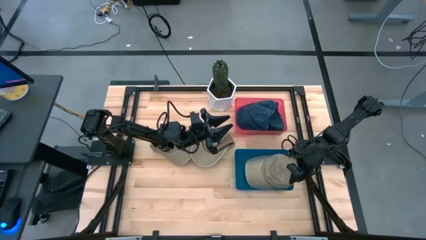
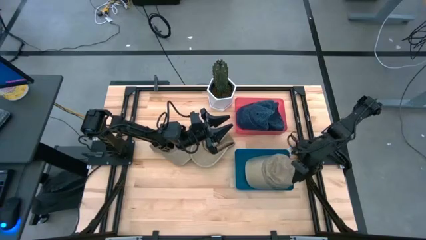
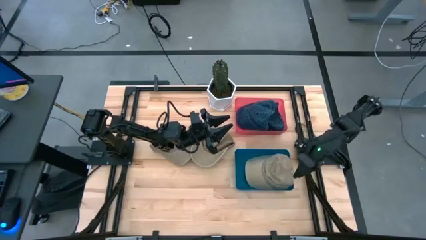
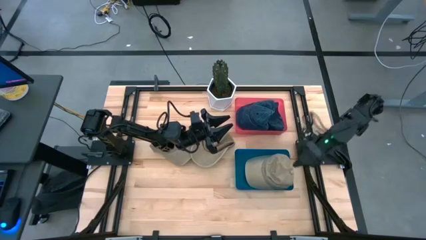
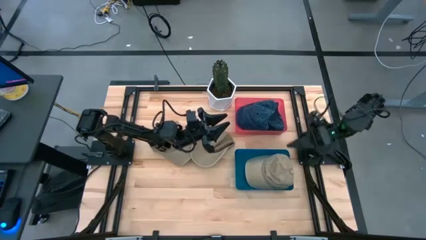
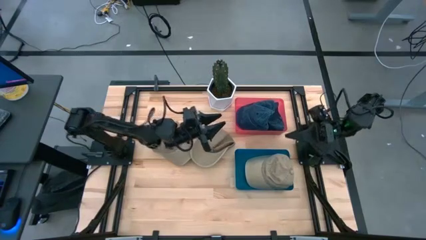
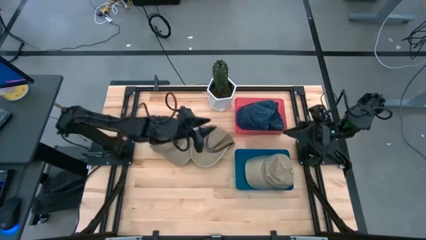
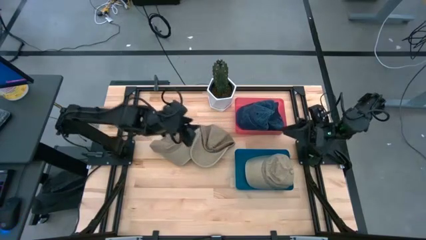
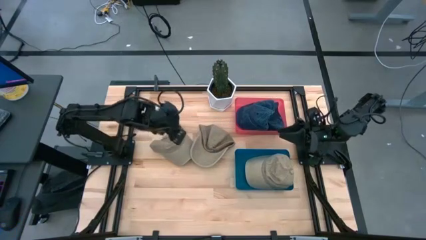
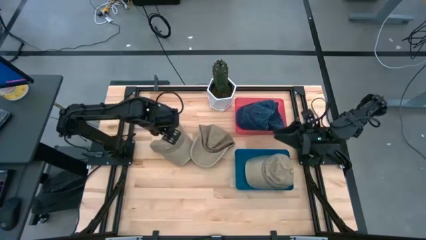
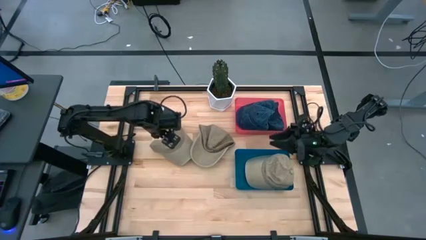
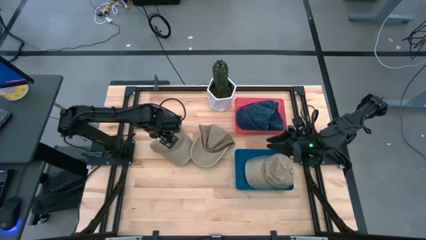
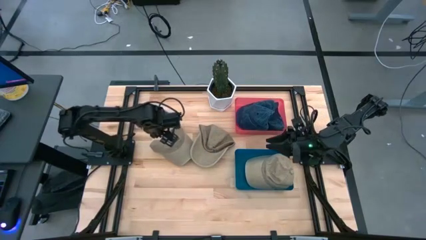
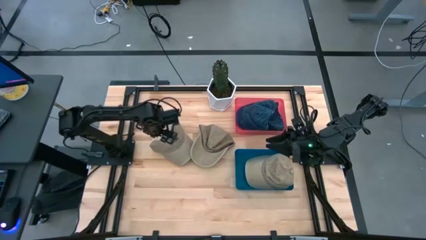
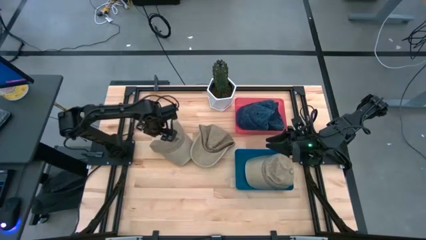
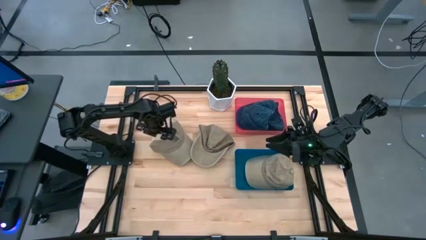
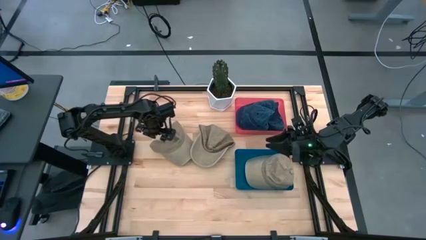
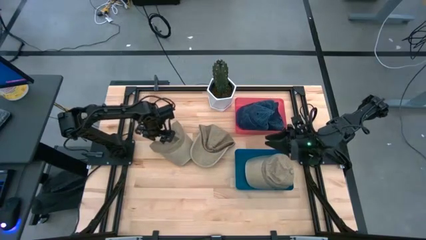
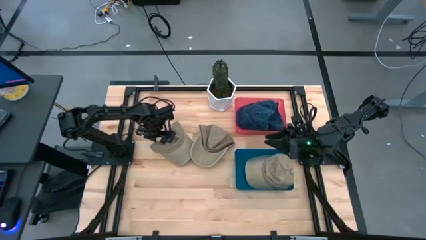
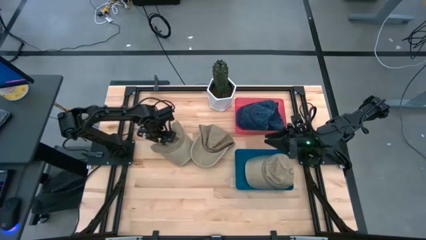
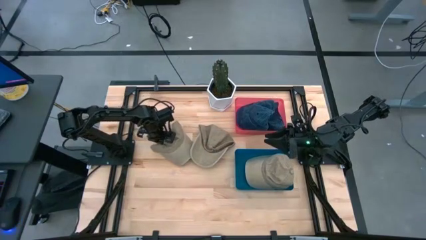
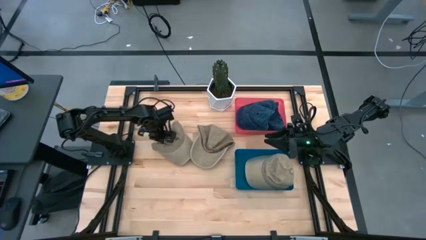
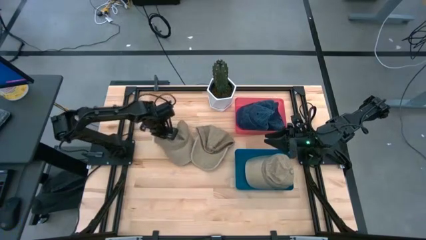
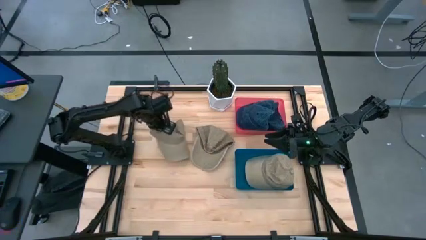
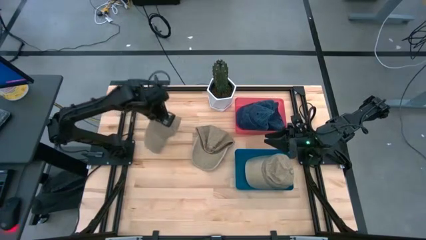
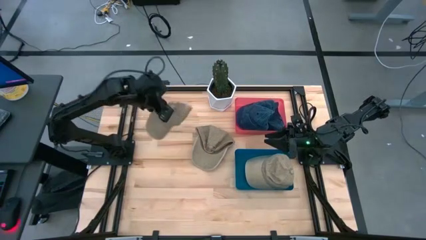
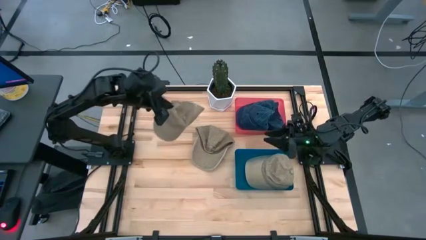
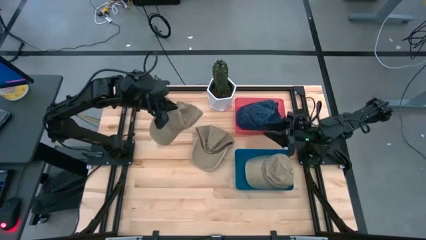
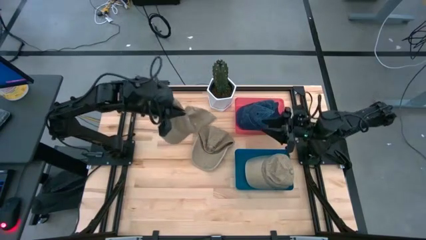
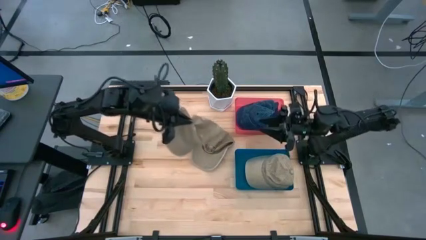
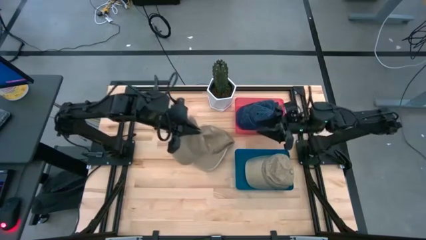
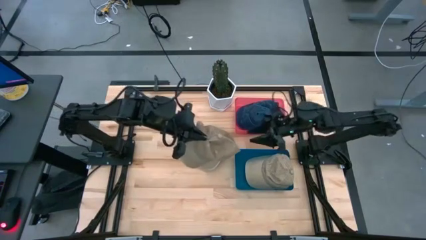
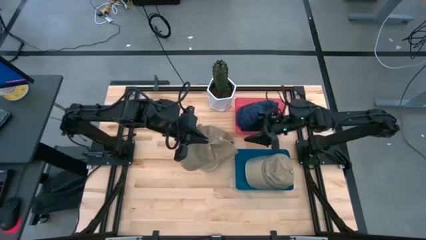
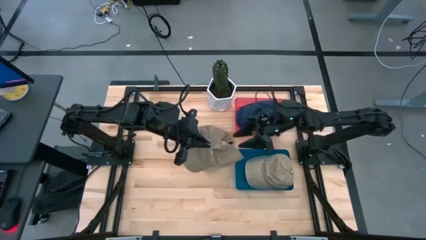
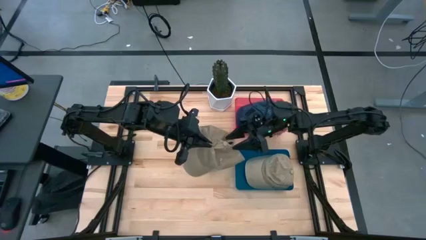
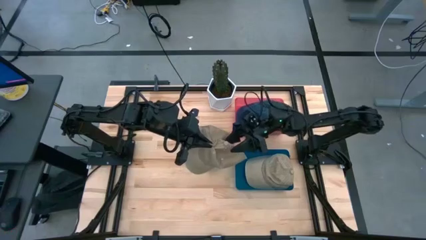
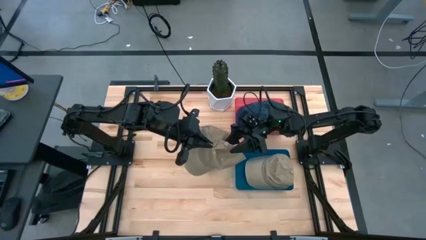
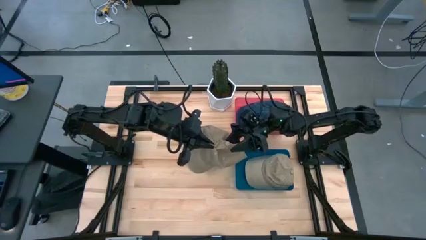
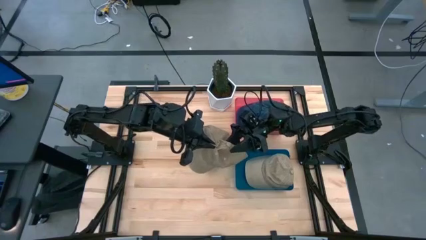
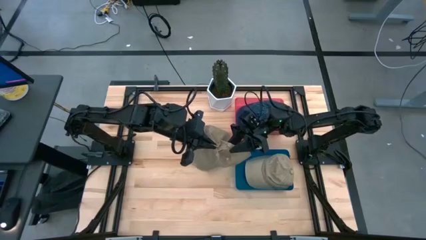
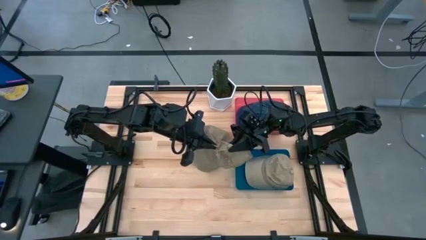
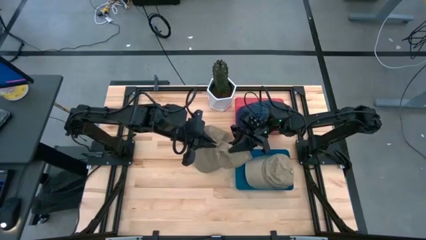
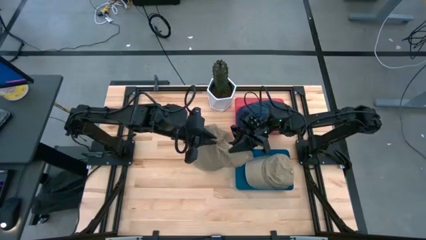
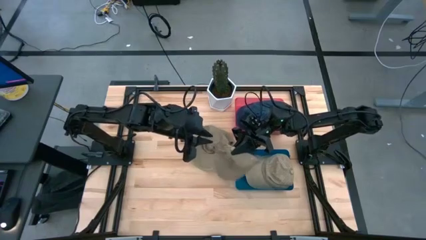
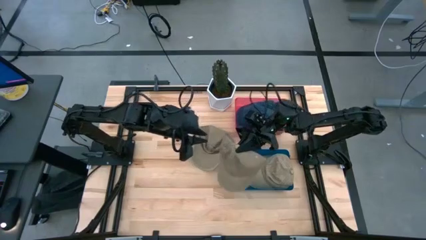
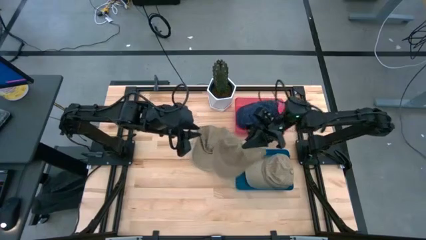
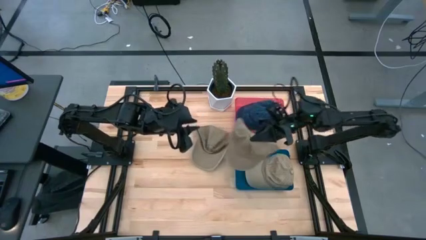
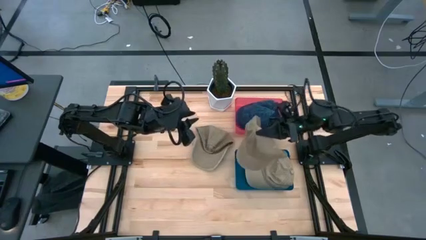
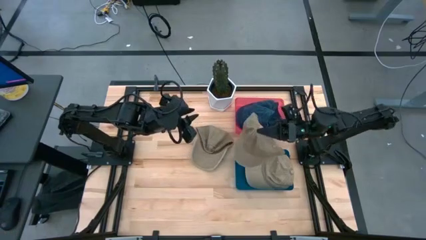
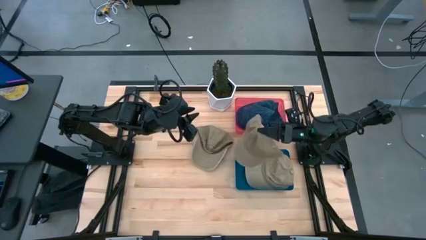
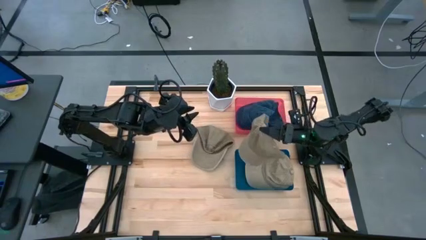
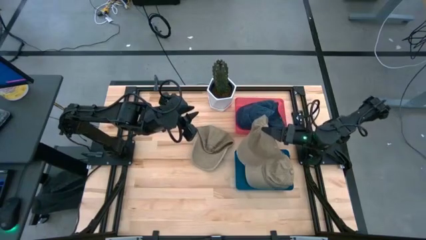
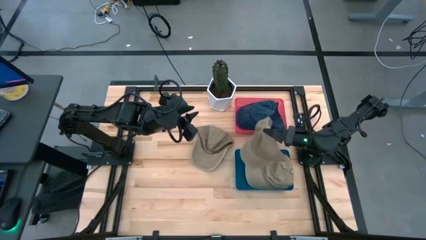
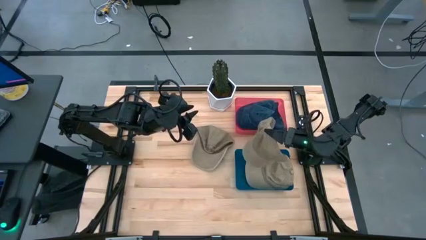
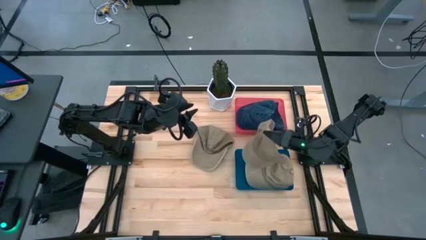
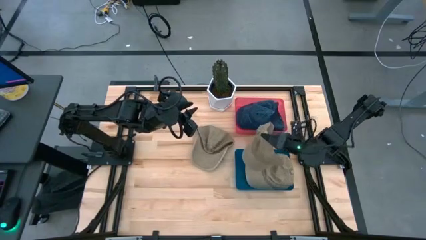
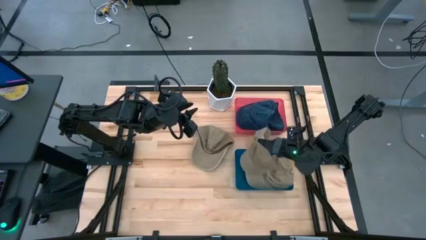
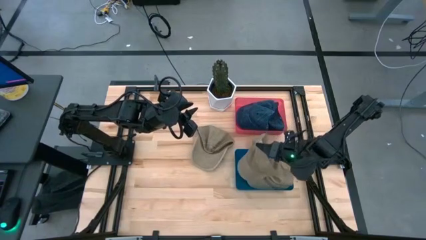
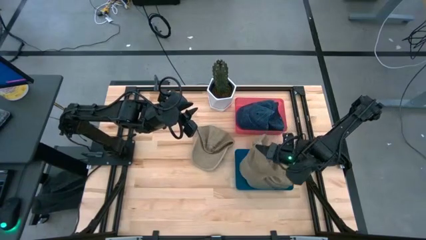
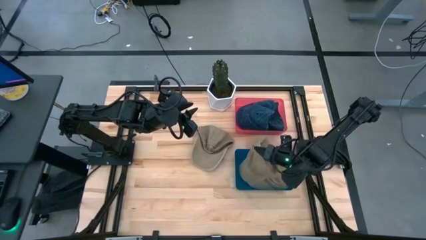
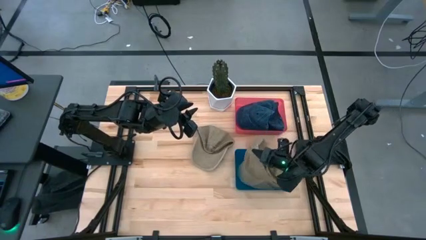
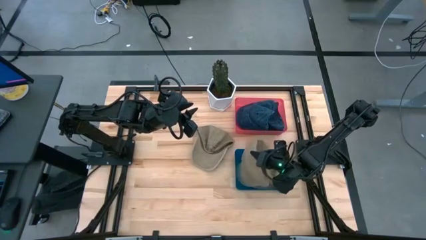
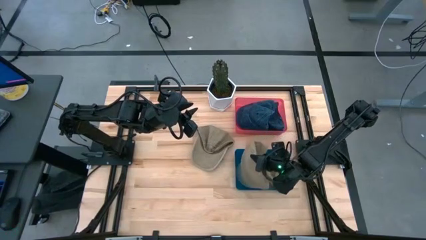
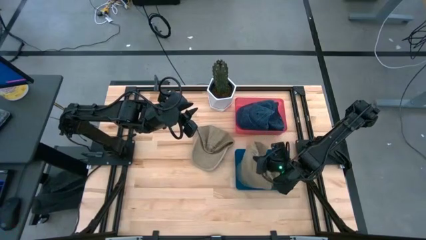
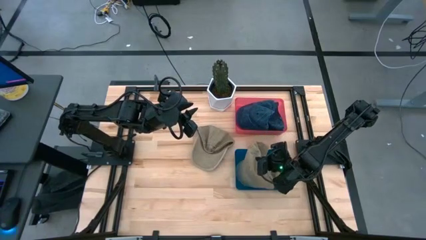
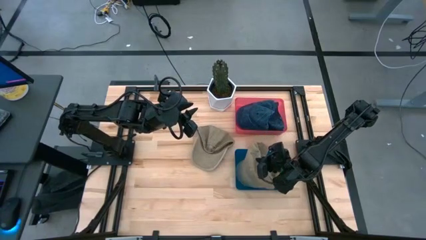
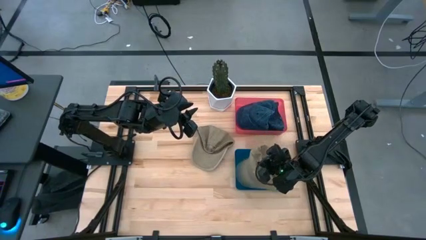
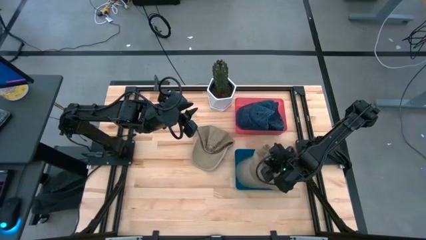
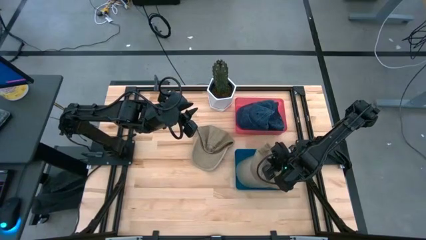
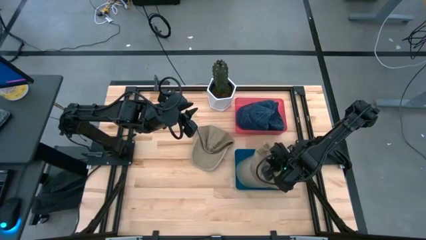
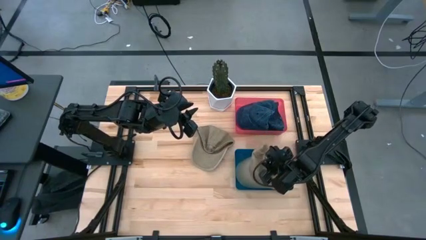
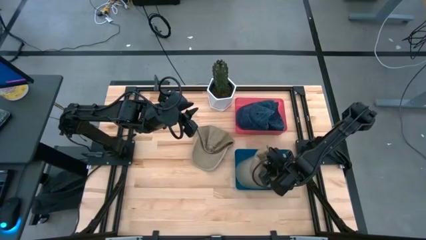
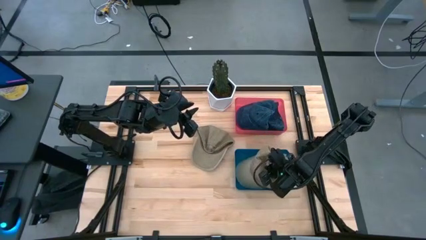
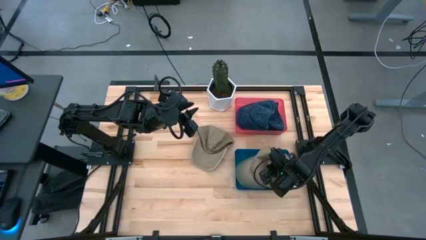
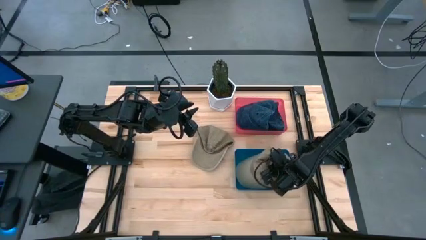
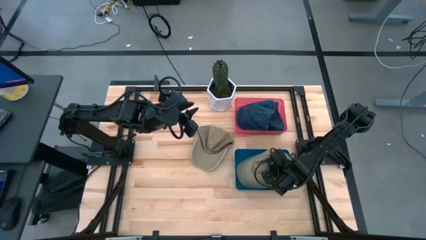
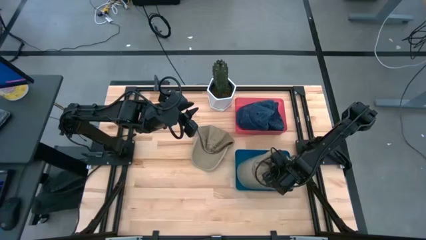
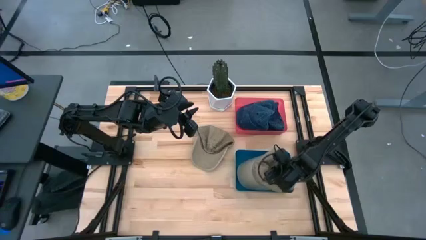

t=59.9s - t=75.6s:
Task: Pick & Place hat
Put the left brown cap into the blue bin

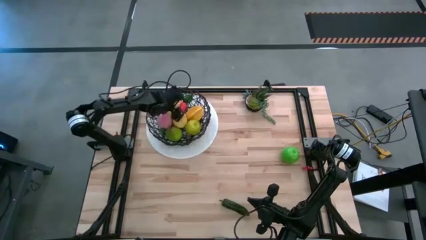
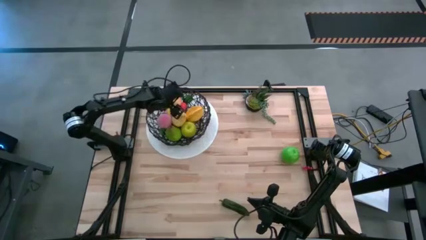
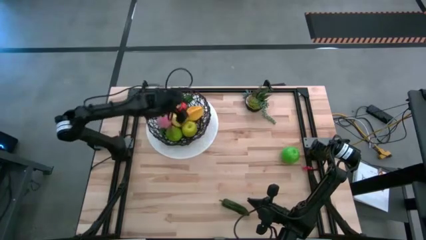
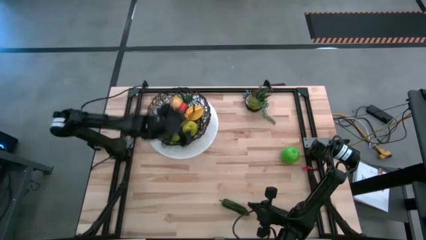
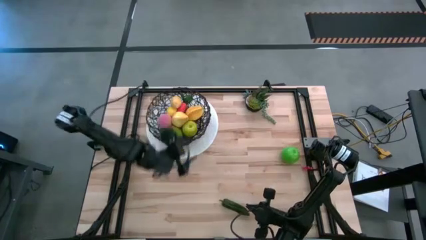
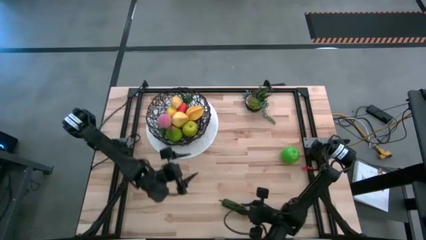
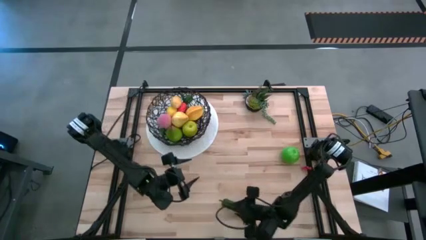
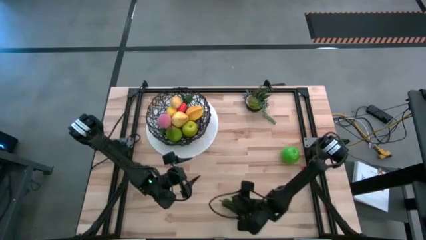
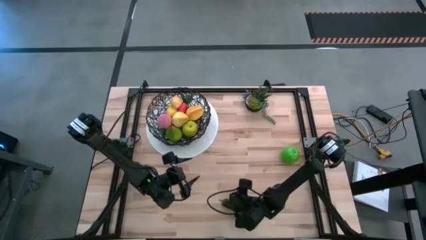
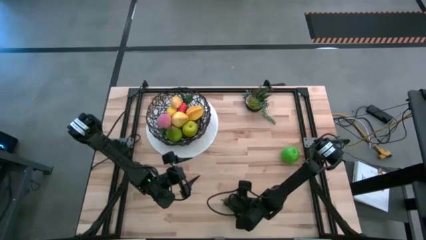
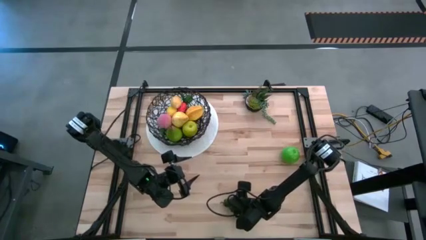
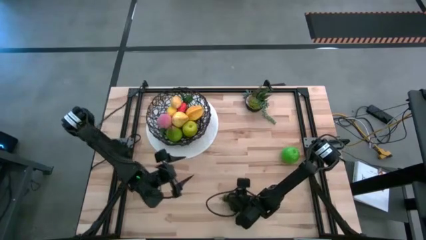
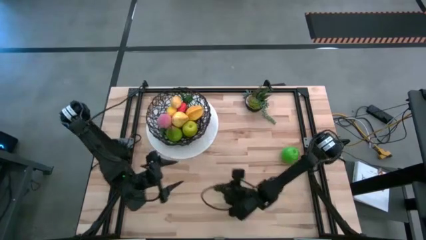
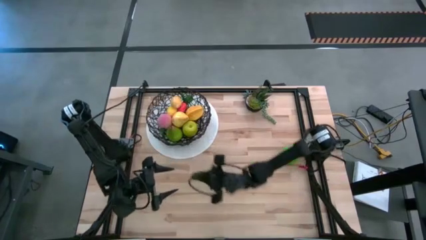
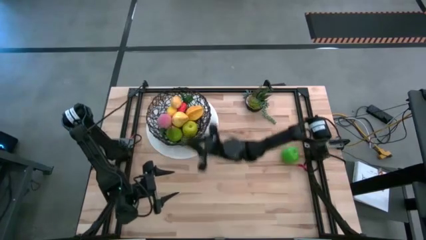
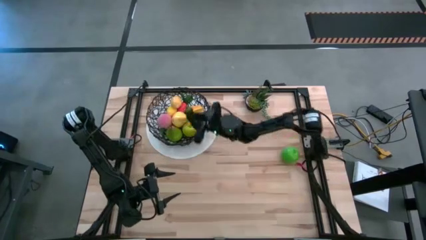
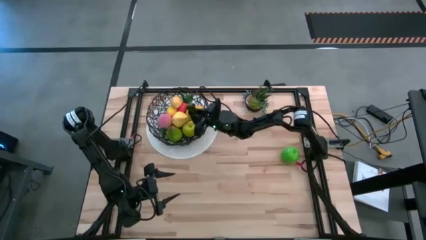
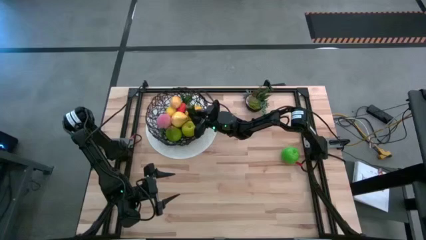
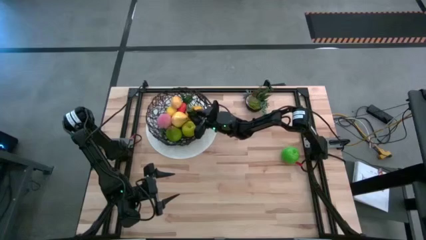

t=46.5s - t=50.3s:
Task: Build produce basket
Put the green chili pepper into the wire basket
